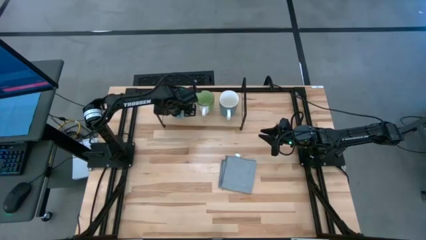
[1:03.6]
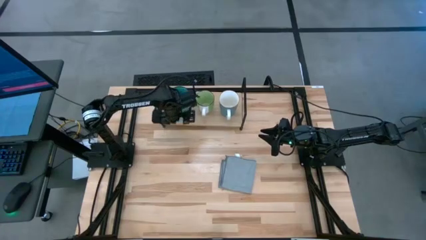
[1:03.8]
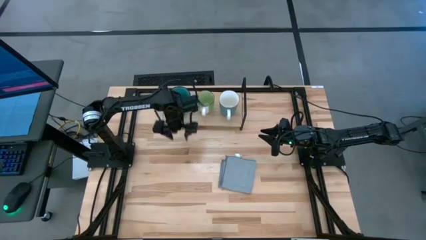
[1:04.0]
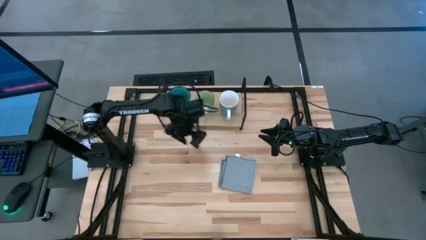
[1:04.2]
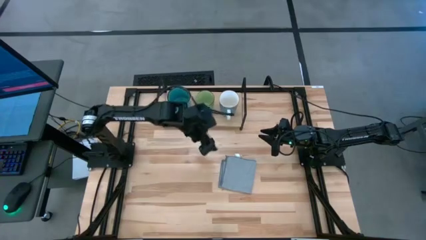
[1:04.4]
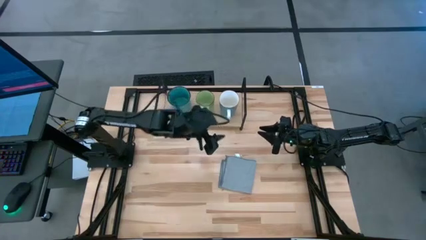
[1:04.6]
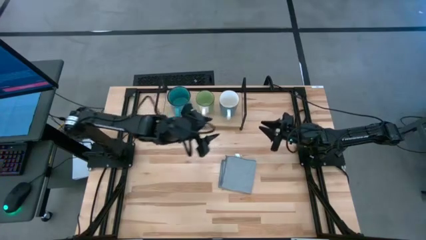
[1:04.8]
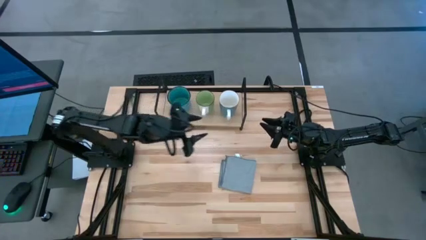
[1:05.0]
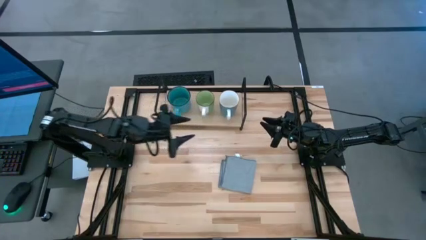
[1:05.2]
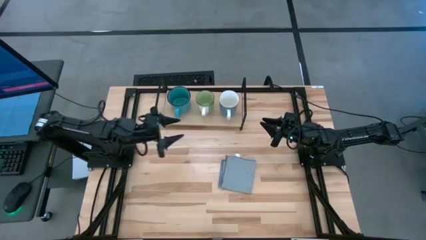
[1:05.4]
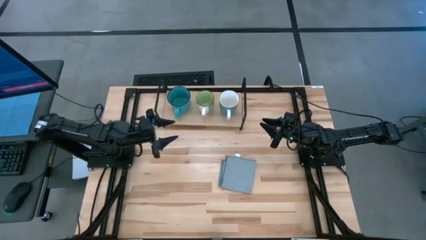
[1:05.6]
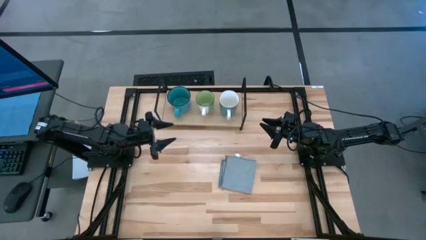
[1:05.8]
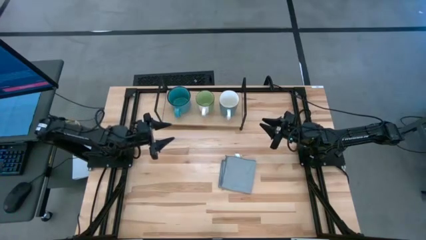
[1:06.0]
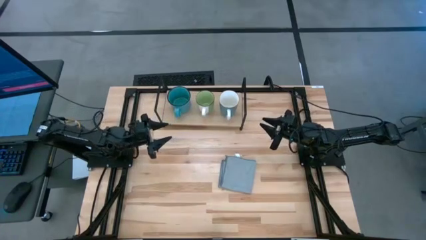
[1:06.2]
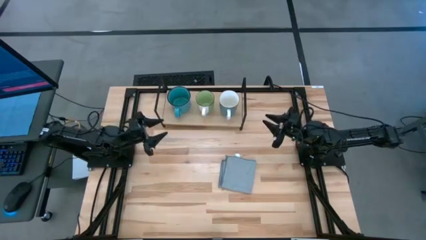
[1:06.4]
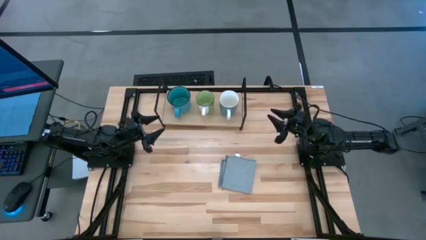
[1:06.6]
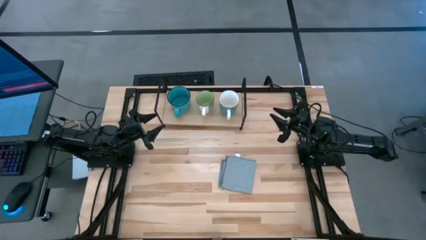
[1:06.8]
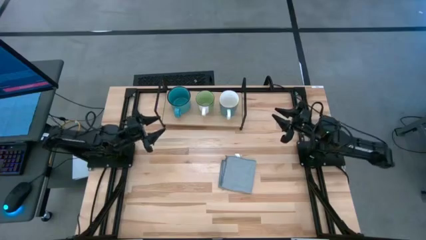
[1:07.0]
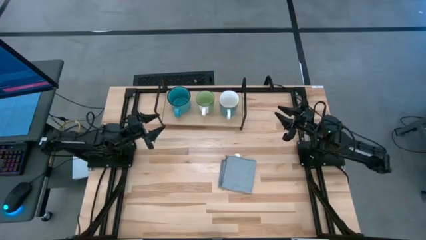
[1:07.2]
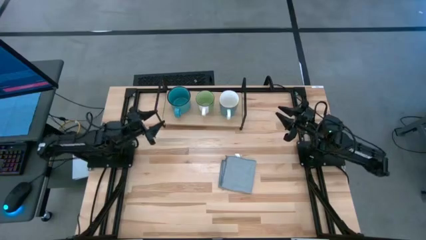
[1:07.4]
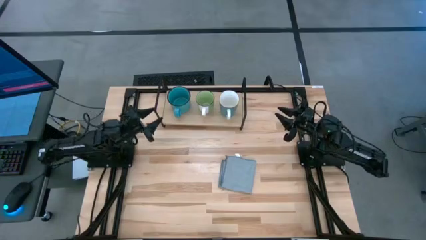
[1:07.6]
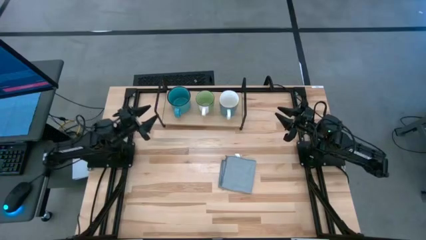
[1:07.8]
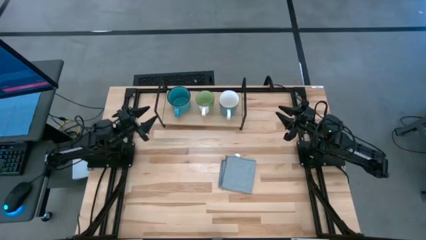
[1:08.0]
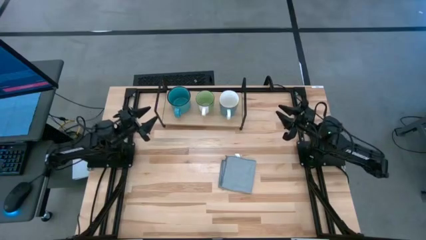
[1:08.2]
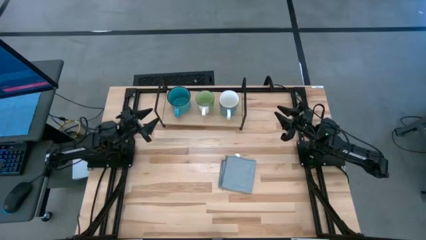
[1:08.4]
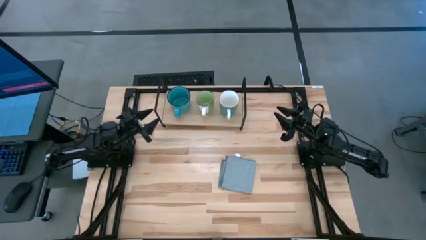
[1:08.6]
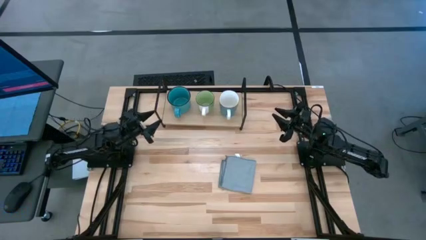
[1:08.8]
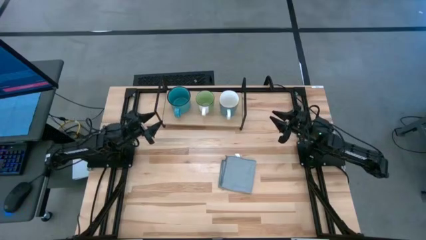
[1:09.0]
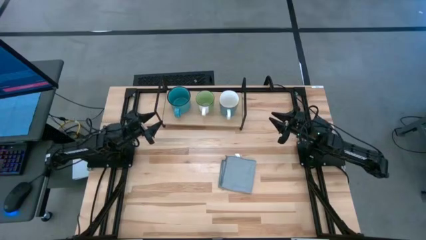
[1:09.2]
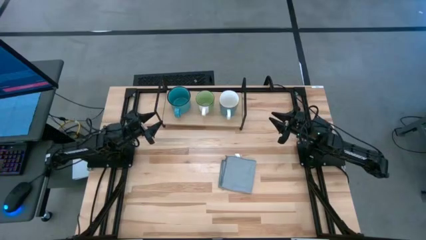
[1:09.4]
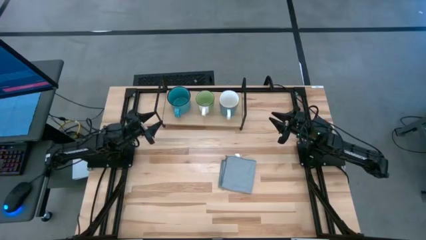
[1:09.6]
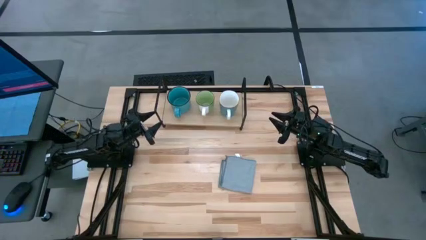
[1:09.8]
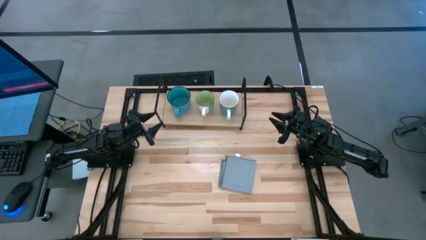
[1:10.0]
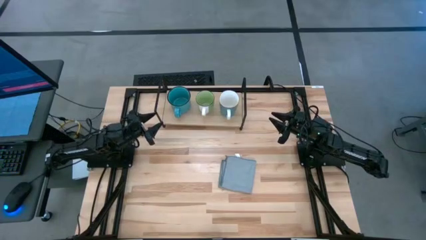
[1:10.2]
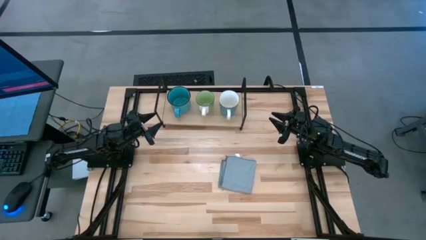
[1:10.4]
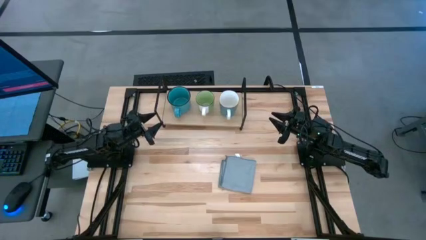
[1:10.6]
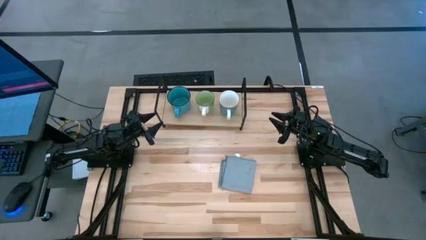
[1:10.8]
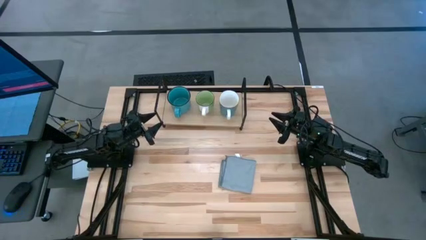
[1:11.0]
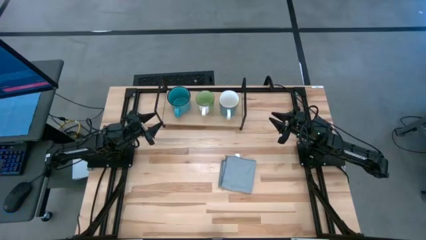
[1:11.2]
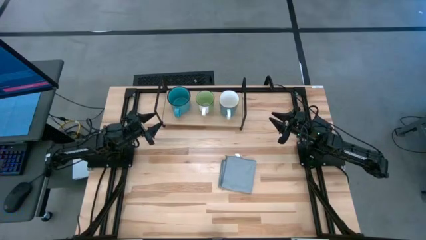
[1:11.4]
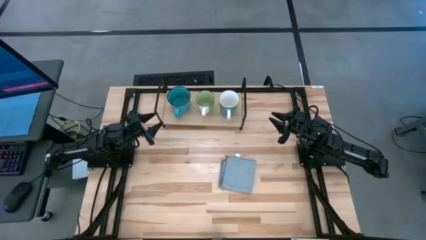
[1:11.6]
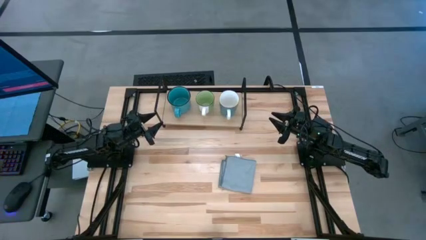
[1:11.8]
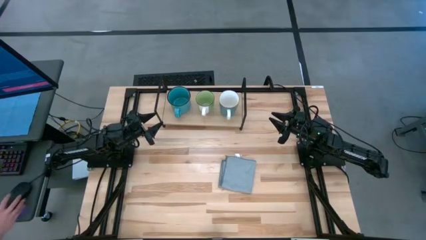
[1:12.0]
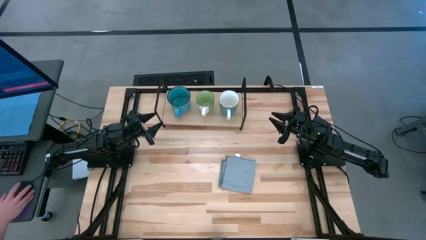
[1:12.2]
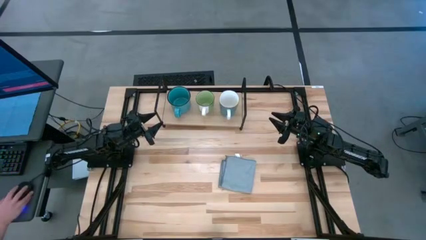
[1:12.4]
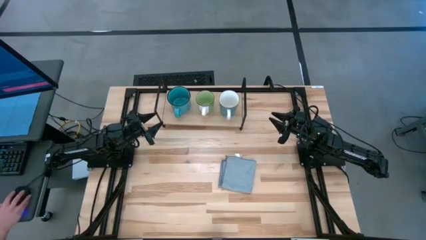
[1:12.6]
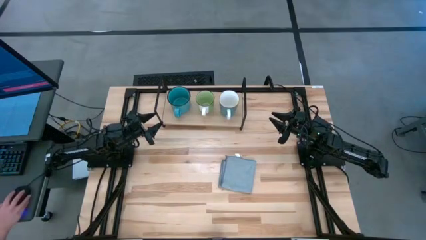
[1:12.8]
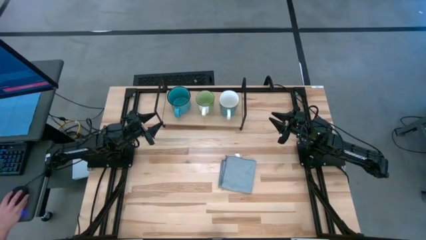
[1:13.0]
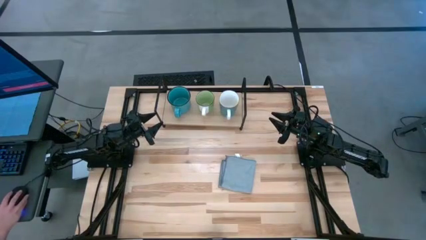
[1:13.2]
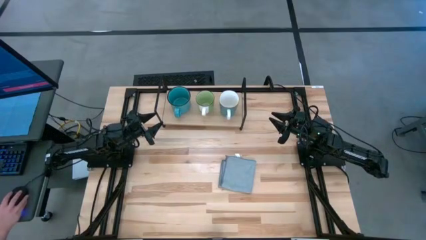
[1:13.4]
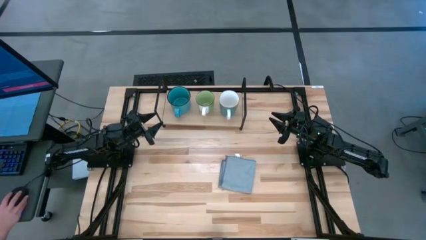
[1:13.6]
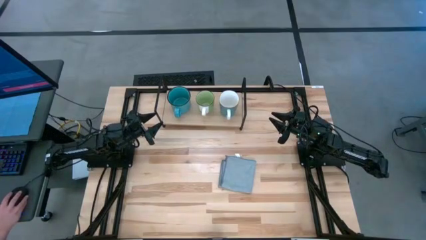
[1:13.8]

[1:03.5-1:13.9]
Task: Stack small to large cups/mugs on shelf
Return to Home Position

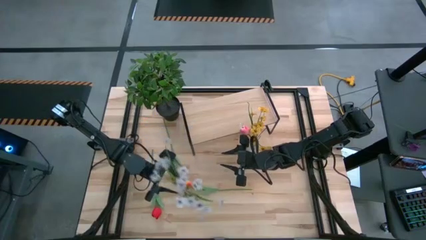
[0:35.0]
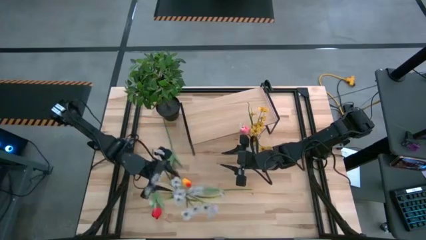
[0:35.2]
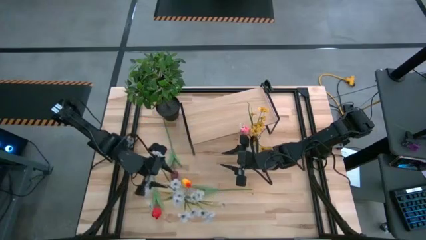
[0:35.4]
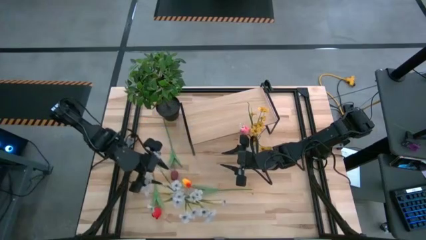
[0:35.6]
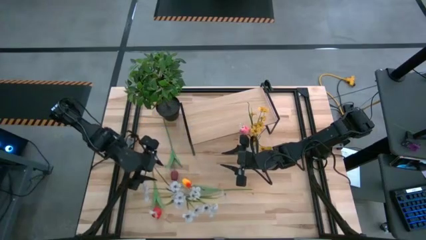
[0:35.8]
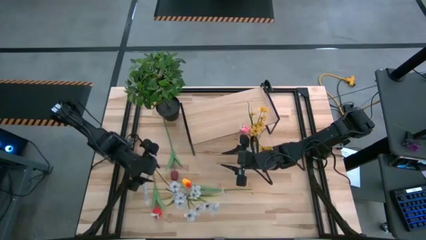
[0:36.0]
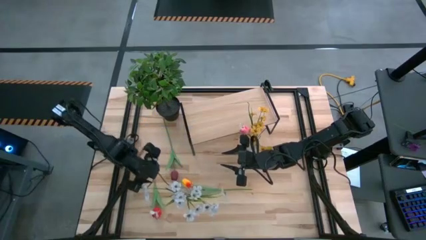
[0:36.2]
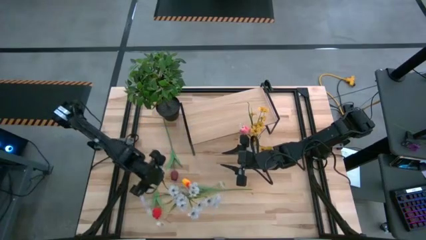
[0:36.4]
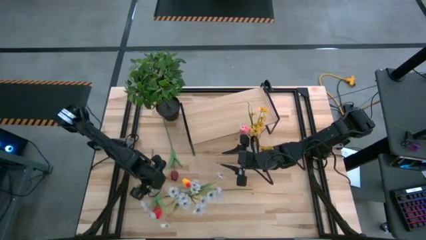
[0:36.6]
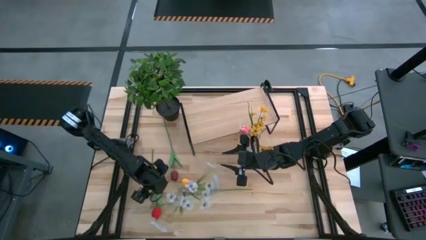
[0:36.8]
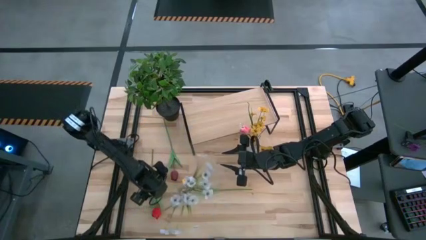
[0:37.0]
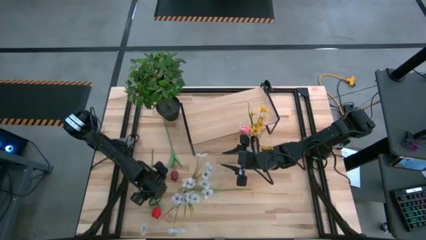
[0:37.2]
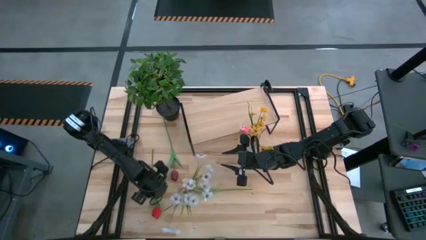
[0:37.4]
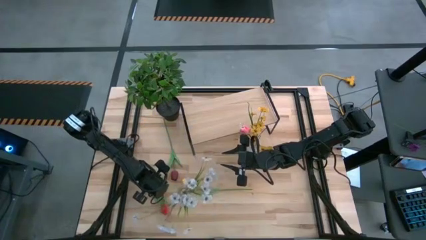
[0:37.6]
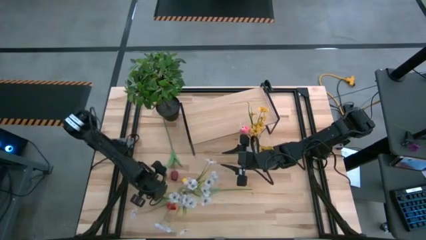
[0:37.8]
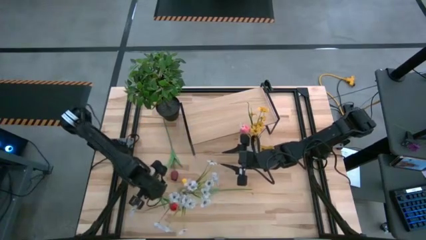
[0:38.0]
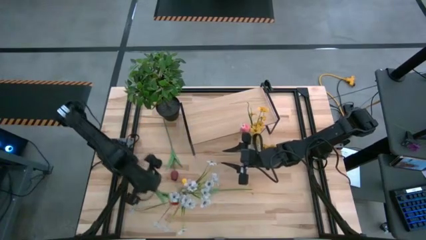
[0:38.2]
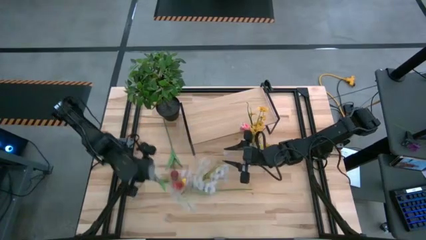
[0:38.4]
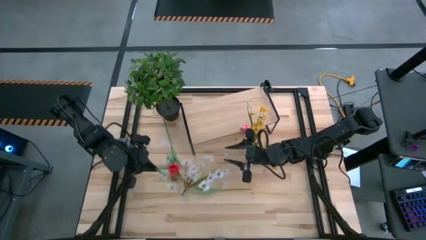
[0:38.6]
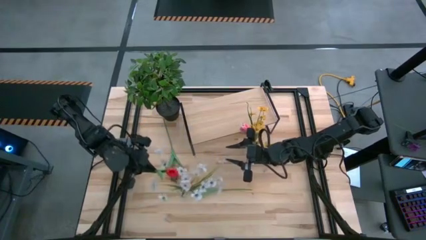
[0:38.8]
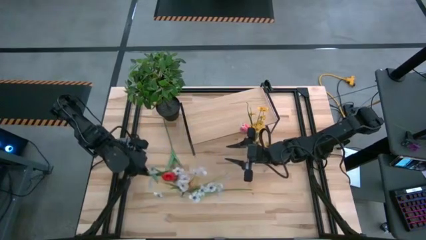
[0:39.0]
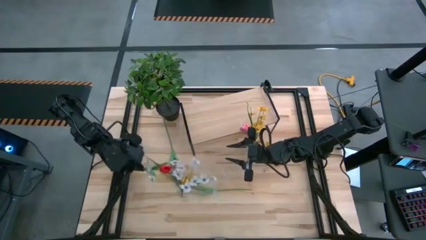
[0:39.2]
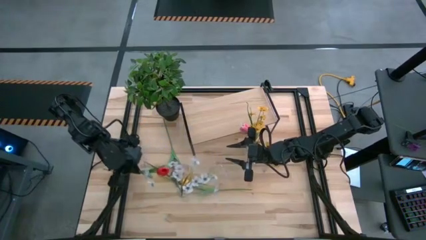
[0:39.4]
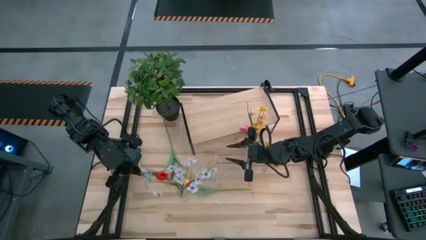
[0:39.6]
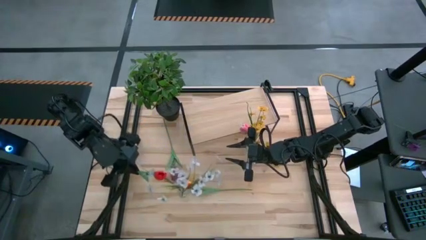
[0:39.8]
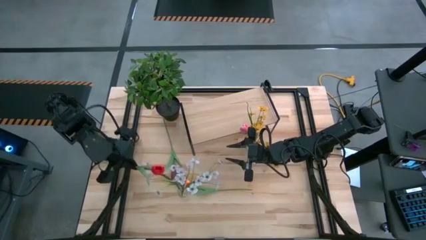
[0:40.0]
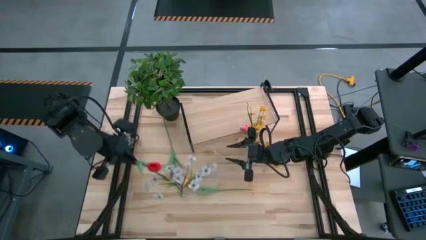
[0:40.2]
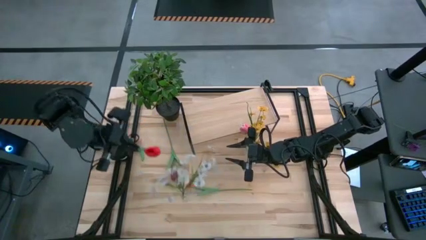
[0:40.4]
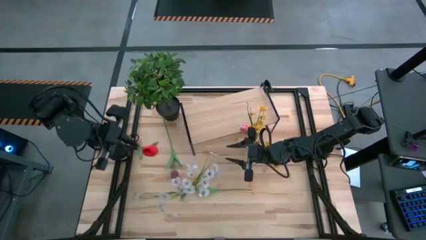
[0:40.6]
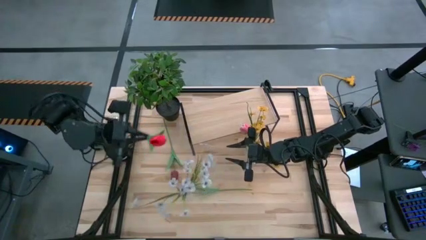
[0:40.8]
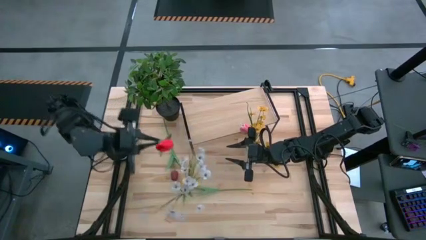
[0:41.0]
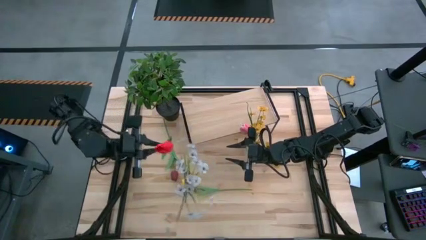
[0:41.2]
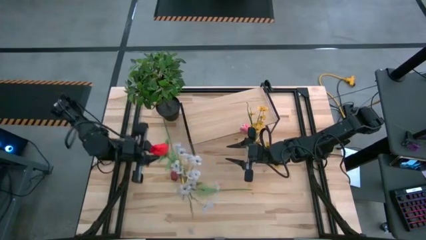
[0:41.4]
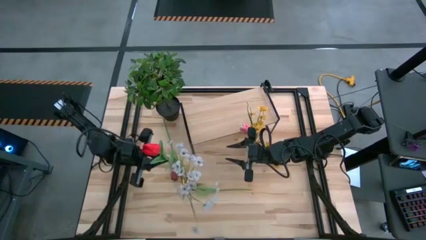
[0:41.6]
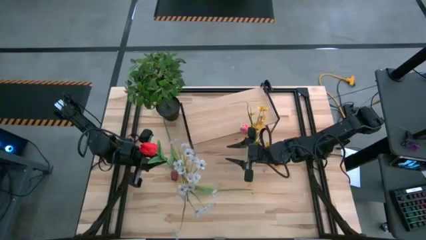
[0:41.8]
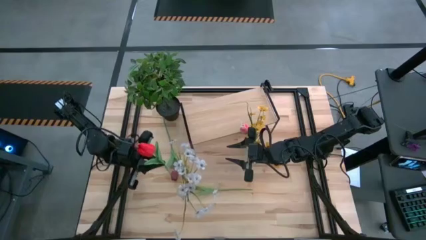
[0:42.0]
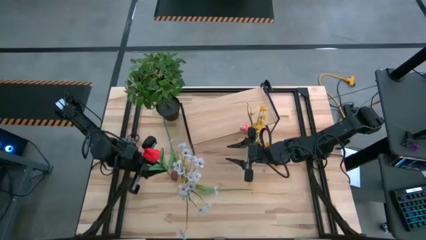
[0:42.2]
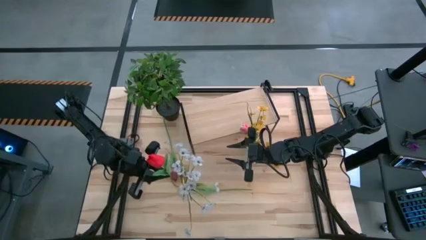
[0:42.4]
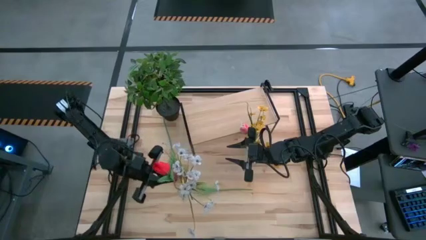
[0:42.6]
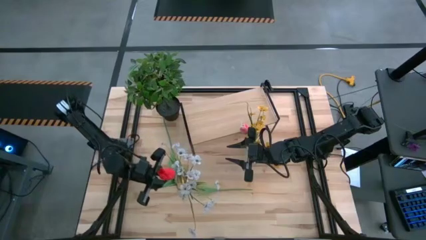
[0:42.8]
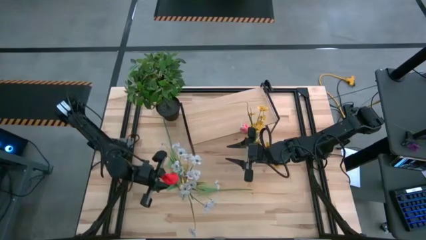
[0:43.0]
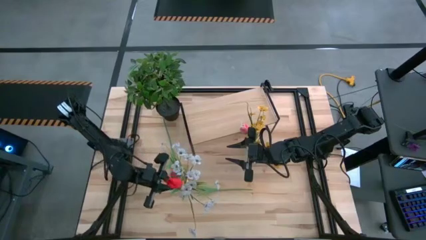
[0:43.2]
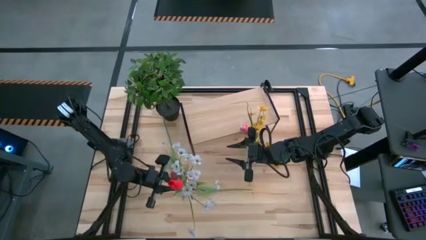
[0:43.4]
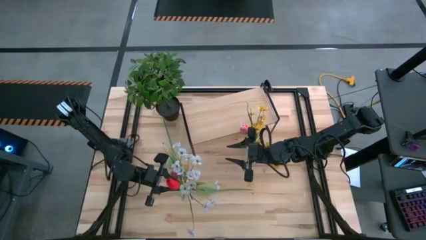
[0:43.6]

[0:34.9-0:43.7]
Task: Pick and place flowers into a vace then onto a shelf
Put the red flower into the bottom transparent vase
